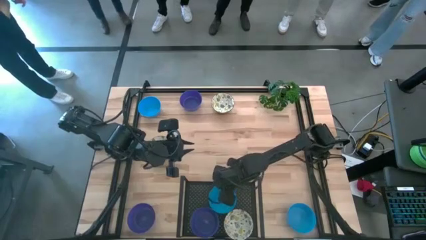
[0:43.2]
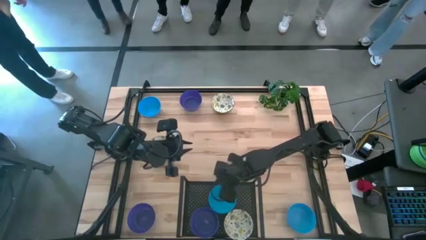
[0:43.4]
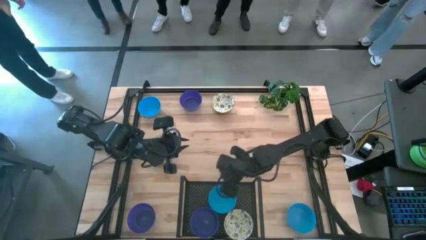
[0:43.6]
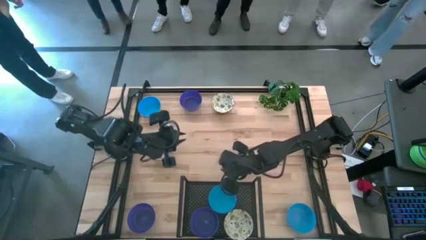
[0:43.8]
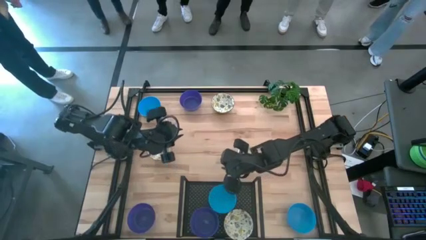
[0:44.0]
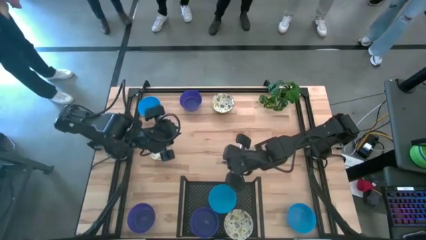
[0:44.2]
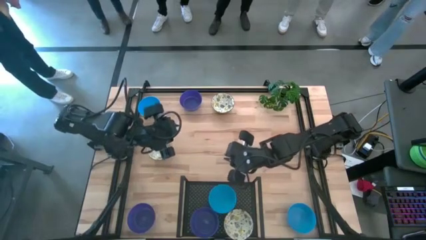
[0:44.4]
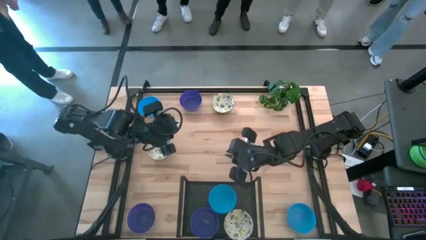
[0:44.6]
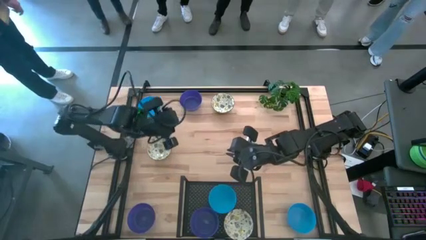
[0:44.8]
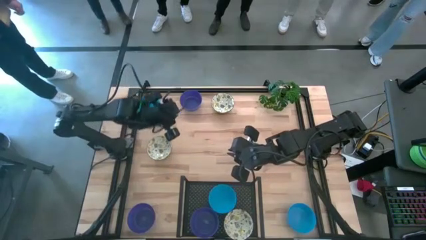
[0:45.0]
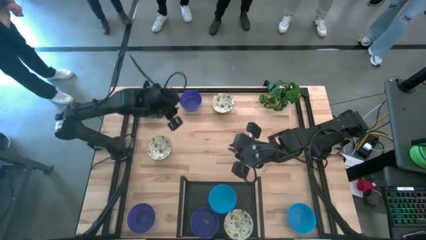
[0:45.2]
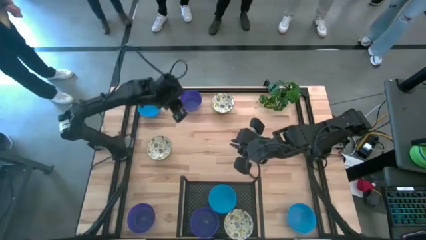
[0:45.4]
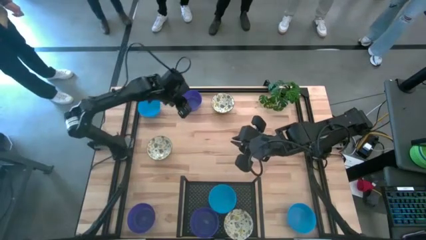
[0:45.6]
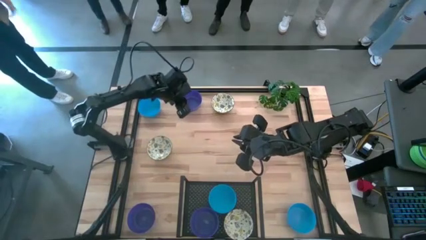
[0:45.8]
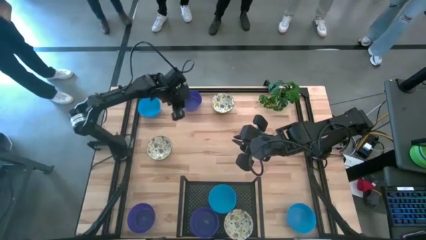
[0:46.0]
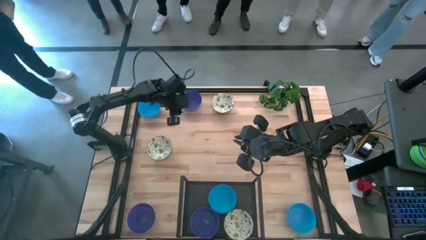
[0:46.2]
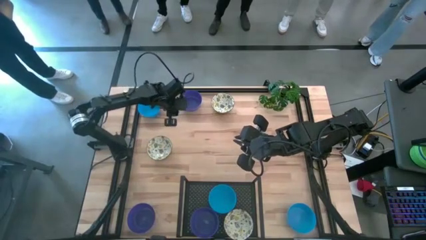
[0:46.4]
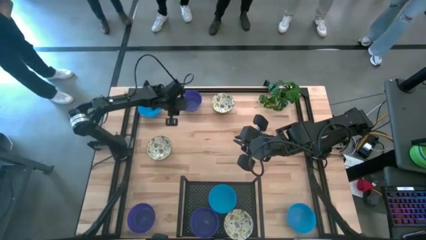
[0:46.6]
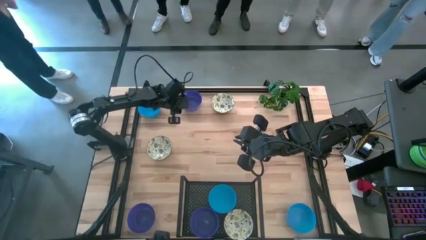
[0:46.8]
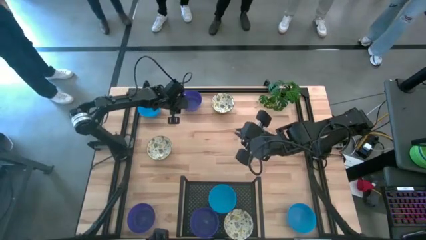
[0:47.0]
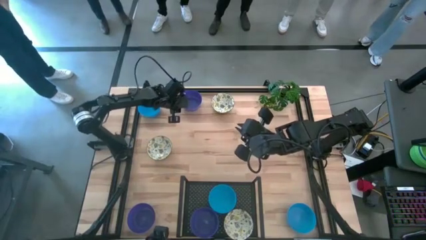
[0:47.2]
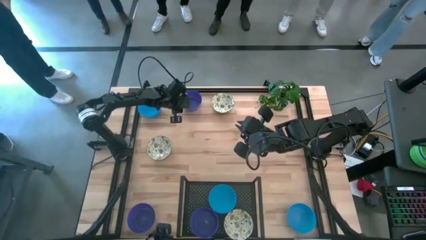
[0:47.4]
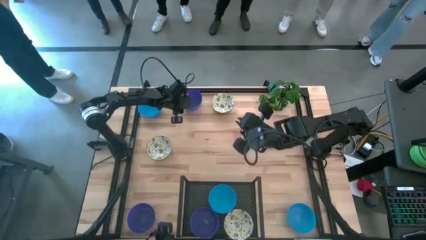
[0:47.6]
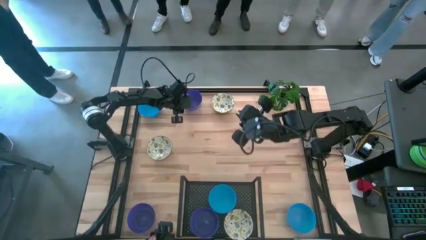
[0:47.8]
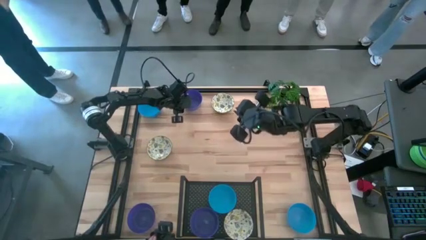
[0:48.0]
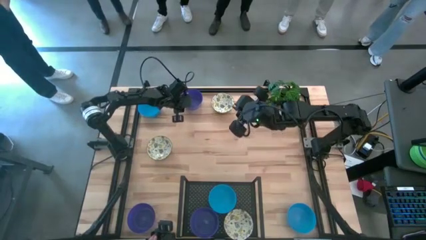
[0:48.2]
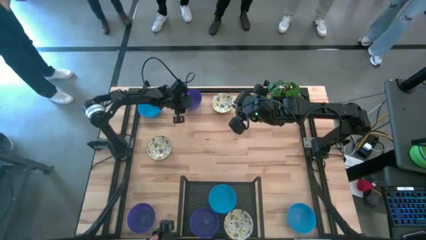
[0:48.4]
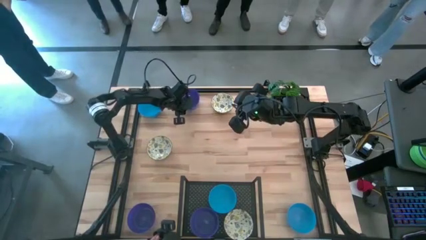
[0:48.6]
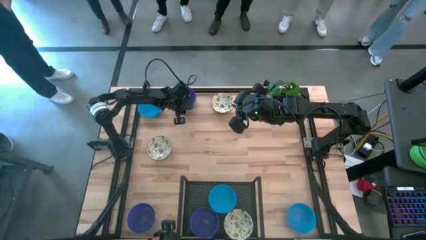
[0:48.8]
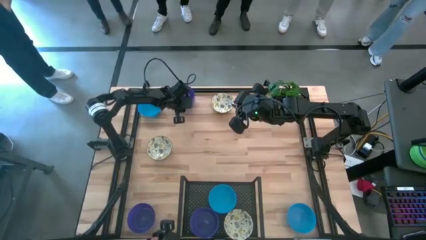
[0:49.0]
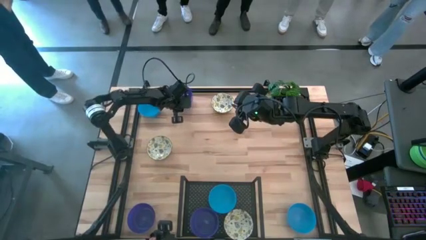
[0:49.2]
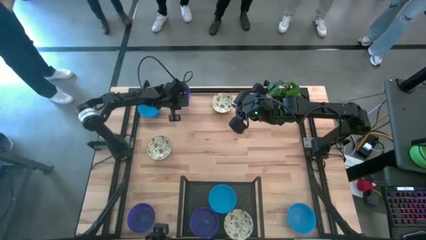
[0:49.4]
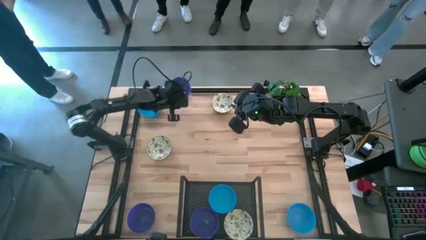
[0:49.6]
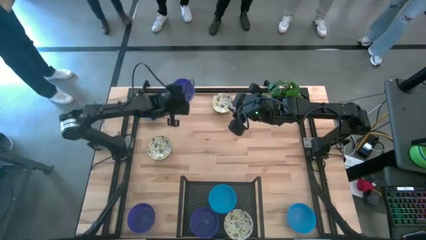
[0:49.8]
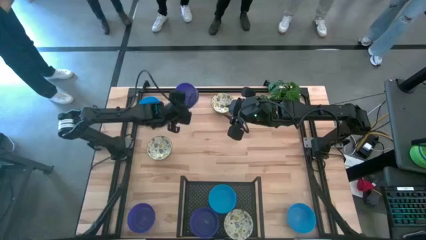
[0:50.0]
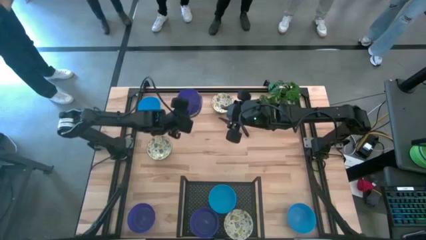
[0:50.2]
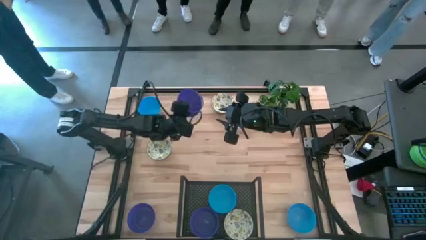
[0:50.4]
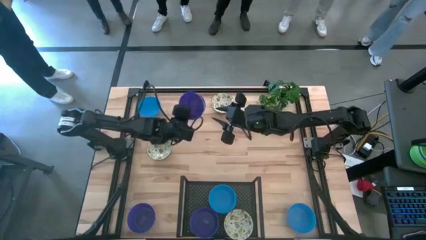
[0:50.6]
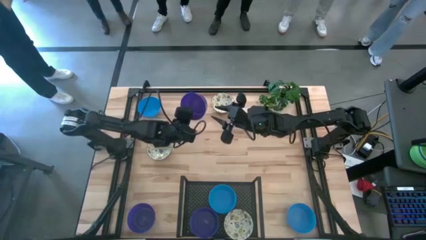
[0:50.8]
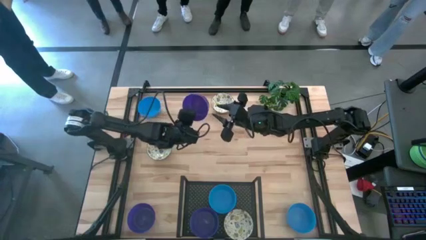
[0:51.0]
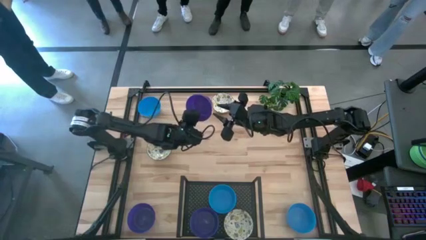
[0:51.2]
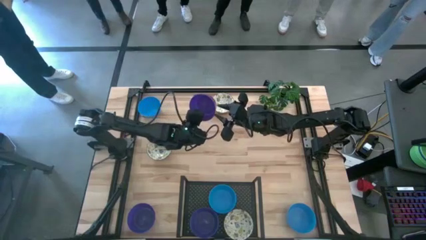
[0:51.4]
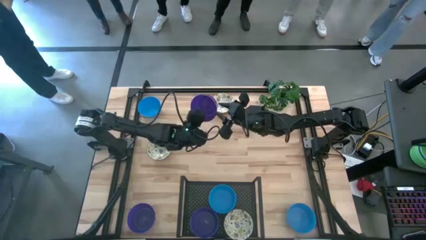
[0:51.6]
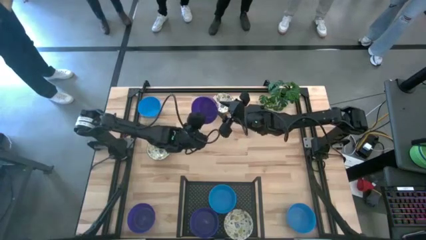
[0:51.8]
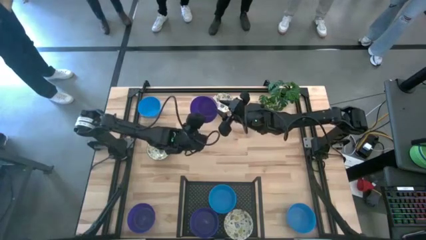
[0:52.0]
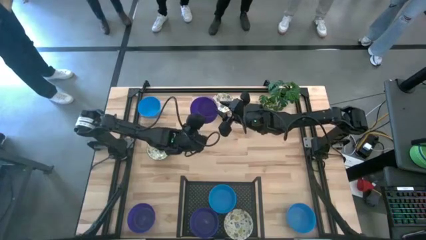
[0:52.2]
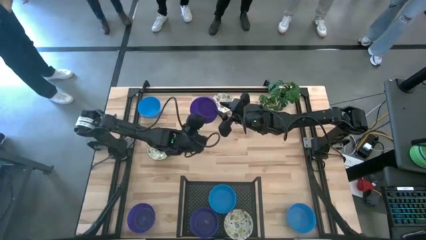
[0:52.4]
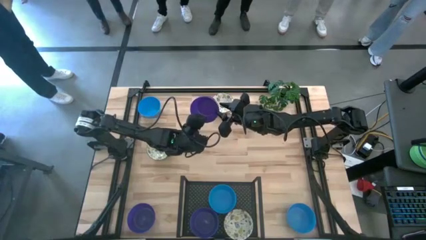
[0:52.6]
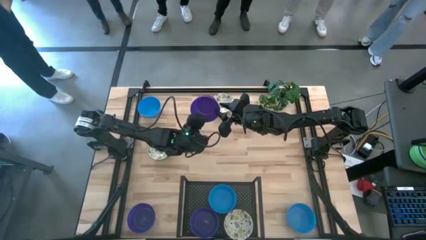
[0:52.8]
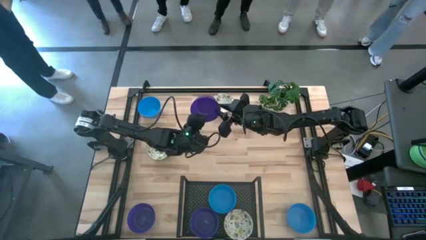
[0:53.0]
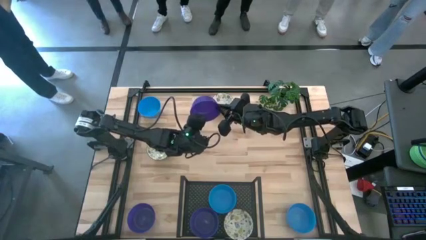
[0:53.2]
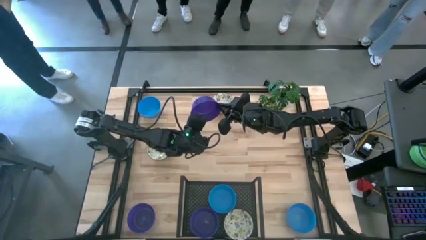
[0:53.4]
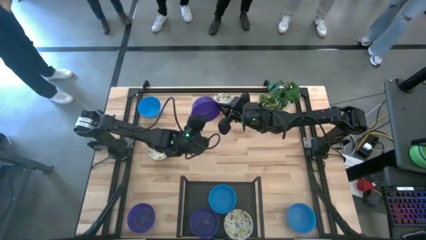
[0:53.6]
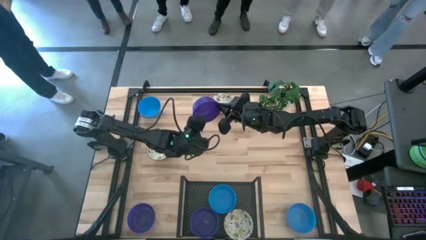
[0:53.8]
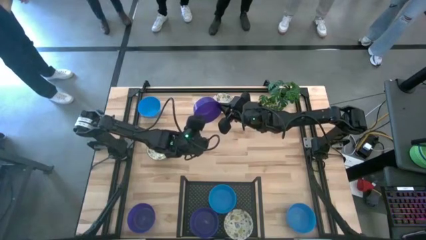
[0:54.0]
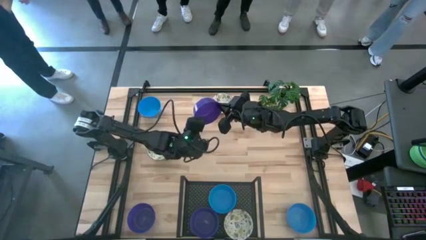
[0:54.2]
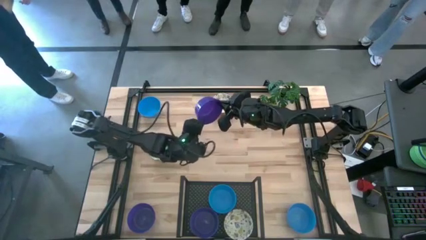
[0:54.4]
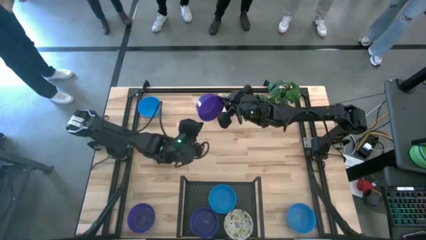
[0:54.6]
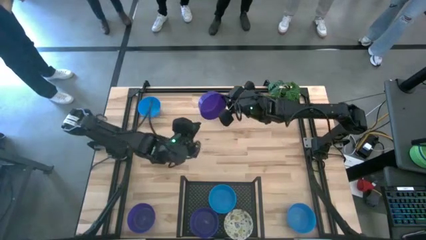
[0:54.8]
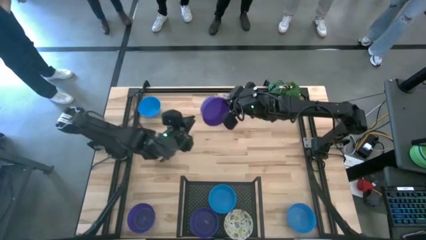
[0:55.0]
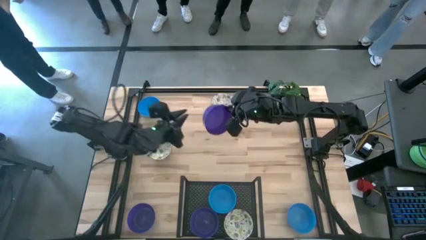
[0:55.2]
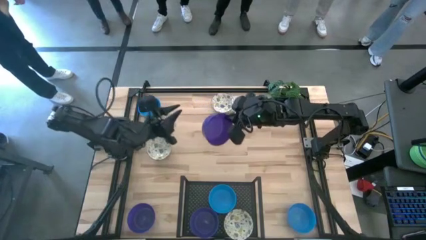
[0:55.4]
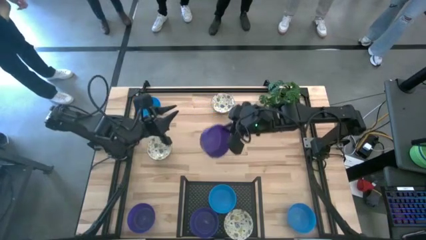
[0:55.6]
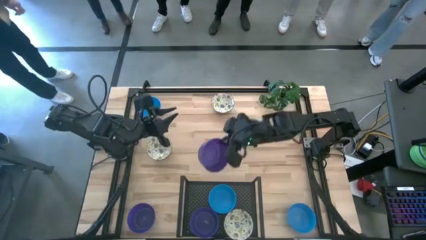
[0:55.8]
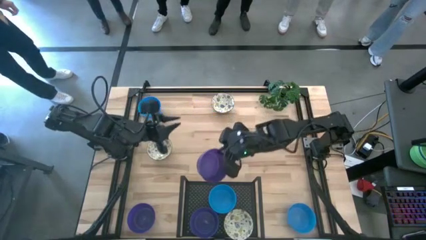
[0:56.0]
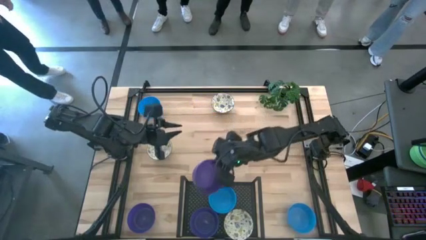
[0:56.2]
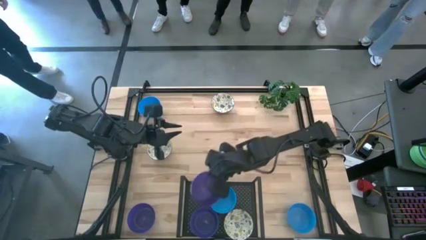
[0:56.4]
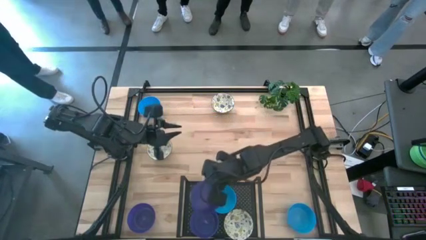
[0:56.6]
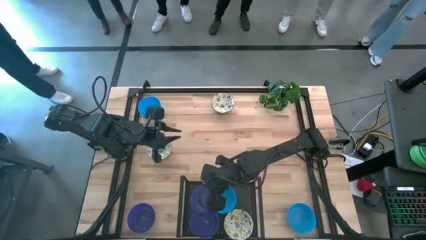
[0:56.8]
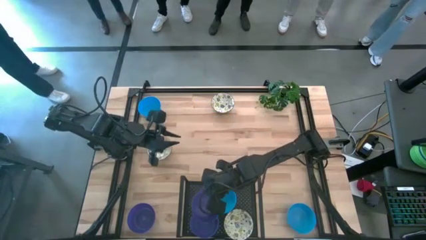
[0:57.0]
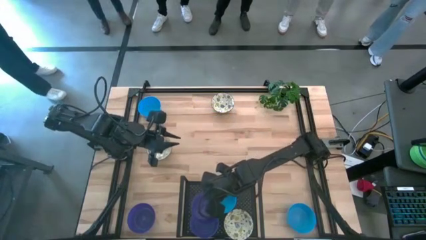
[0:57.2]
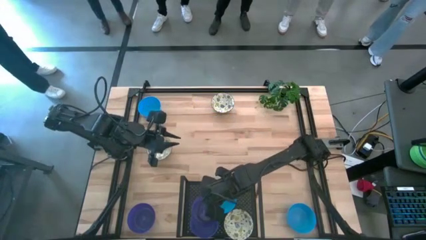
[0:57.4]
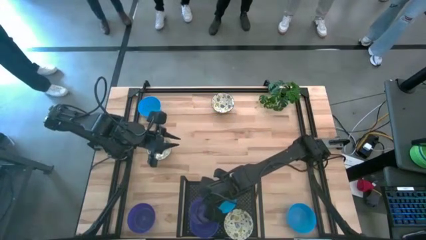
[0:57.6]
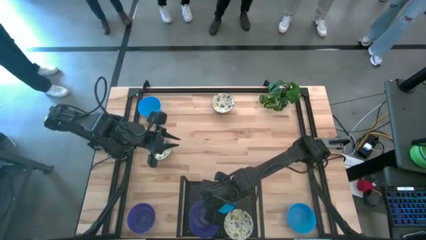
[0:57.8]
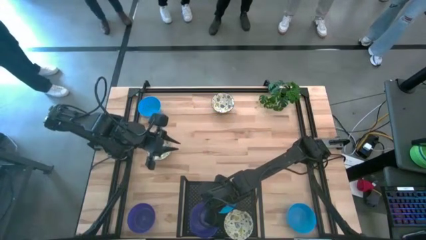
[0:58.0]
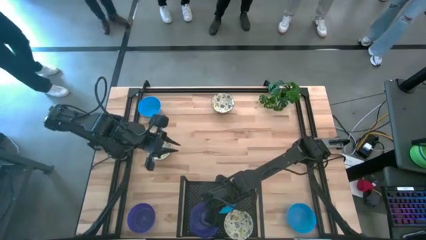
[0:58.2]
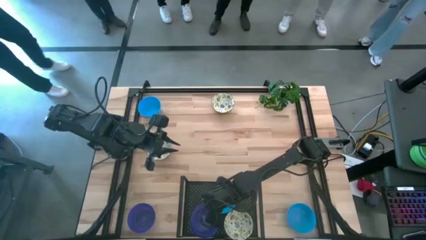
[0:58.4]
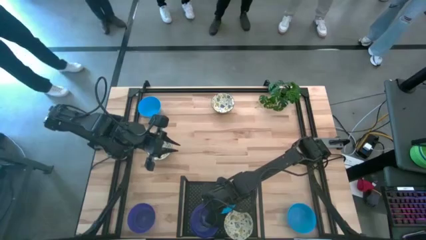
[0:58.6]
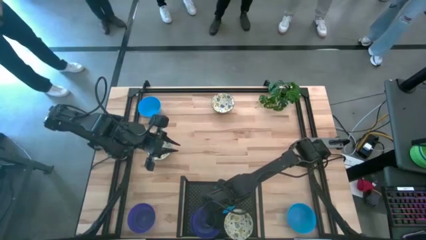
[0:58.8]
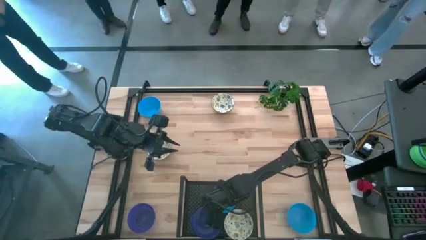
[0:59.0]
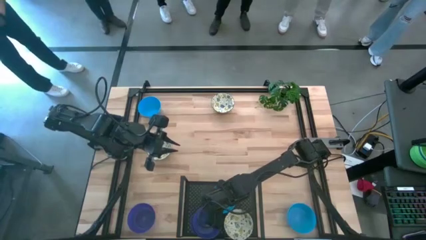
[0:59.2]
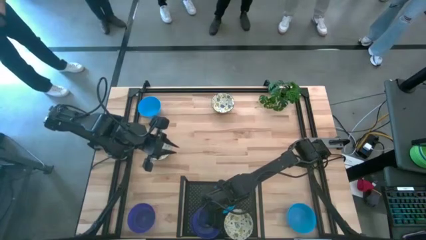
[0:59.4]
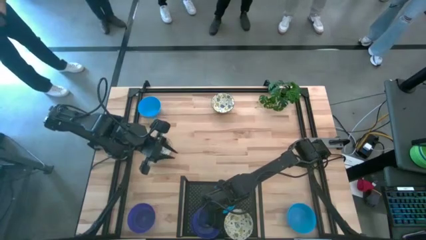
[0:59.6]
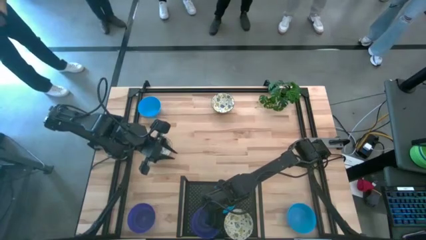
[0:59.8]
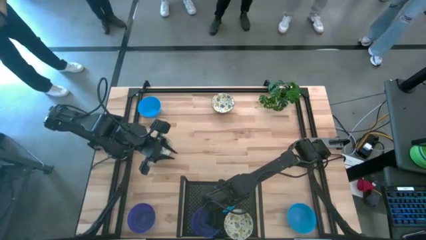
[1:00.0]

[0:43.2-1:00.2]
Task: Pick & Place Mini bowls
Stack the top violet bowl on top of the violet bowl on the shelf
